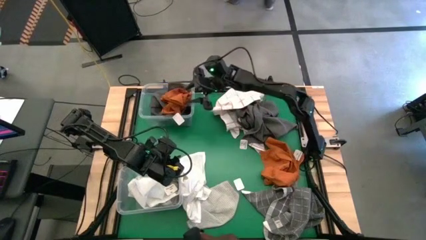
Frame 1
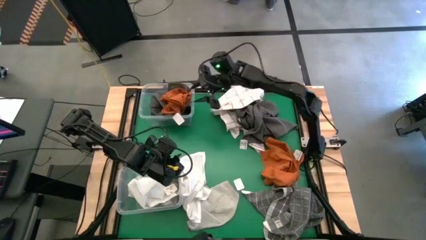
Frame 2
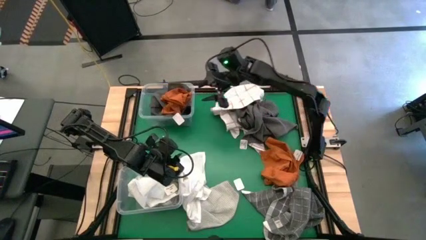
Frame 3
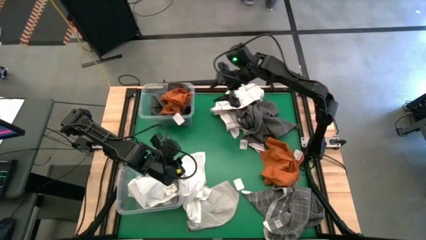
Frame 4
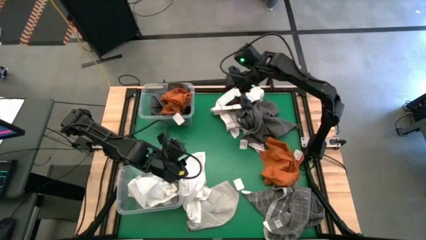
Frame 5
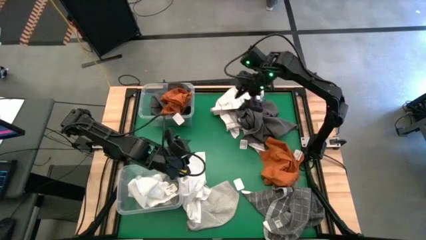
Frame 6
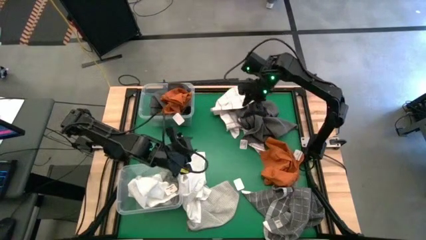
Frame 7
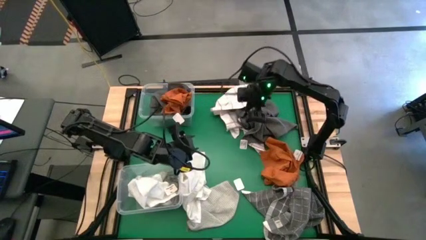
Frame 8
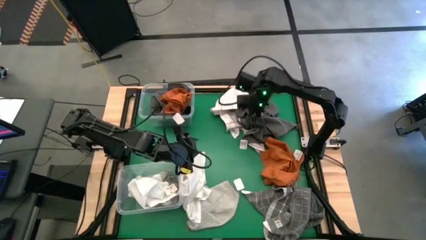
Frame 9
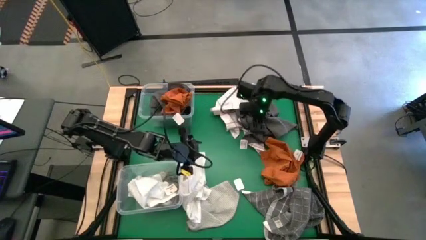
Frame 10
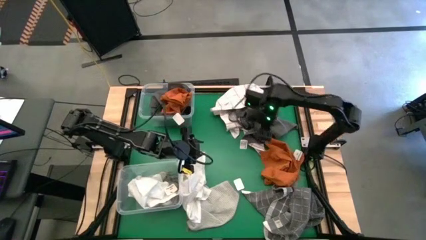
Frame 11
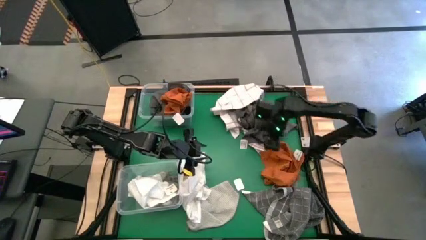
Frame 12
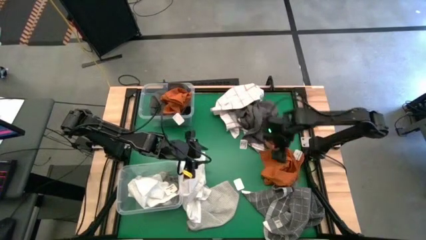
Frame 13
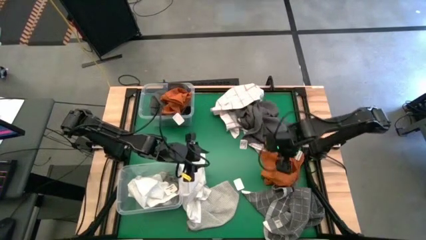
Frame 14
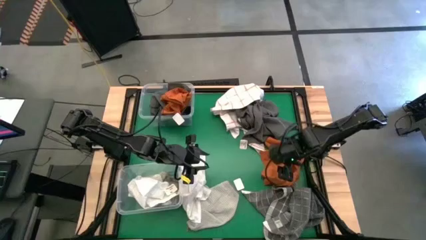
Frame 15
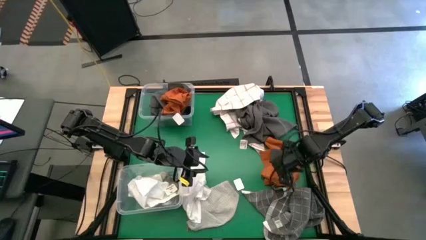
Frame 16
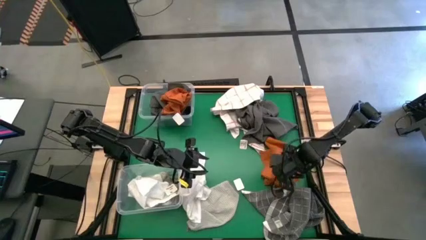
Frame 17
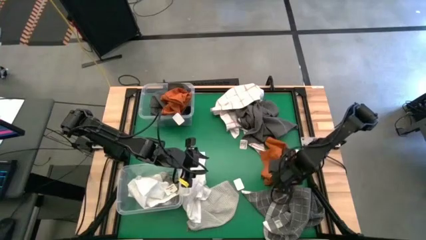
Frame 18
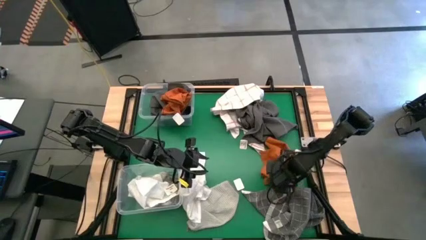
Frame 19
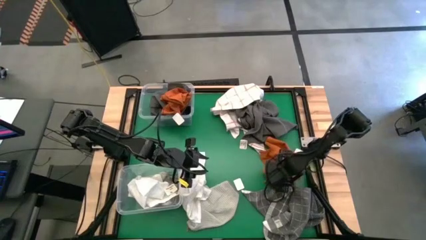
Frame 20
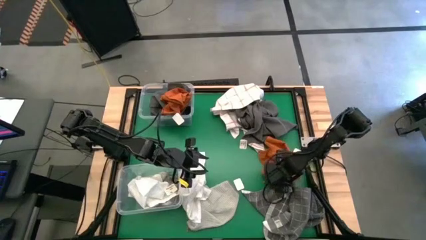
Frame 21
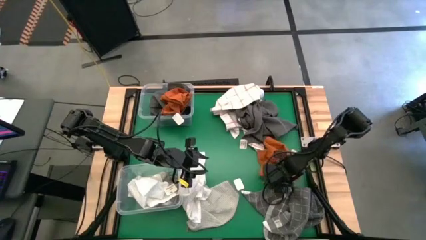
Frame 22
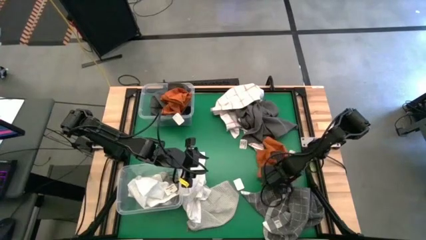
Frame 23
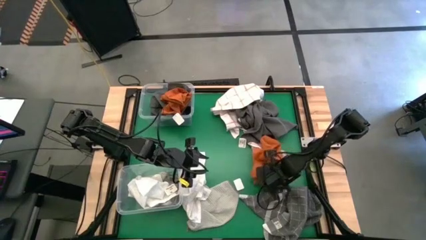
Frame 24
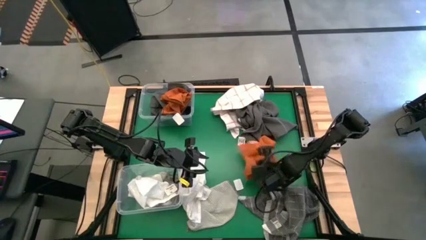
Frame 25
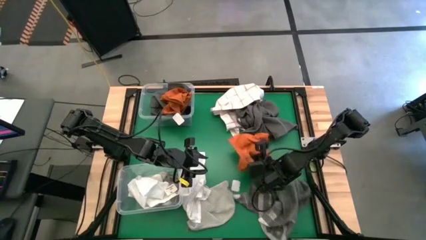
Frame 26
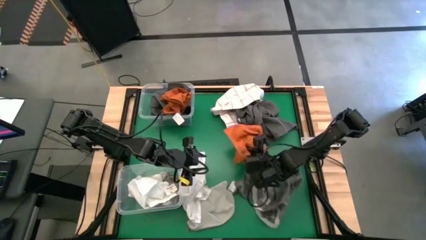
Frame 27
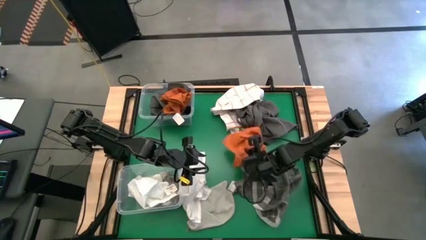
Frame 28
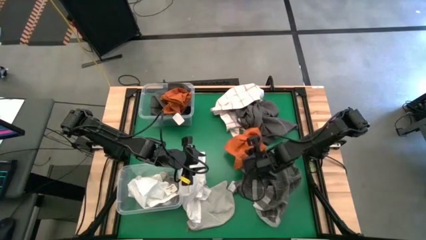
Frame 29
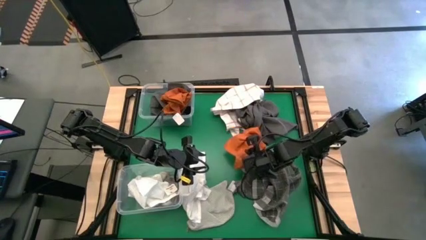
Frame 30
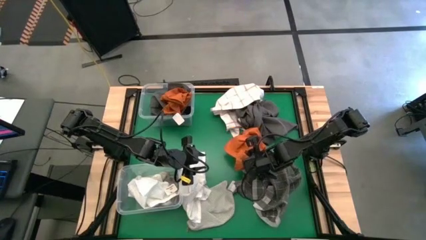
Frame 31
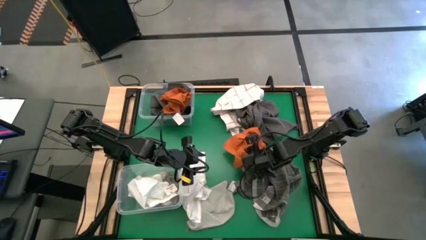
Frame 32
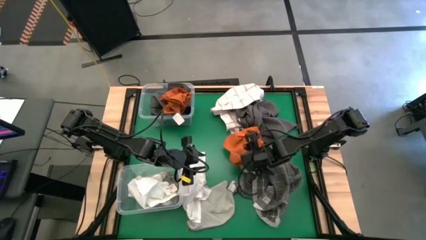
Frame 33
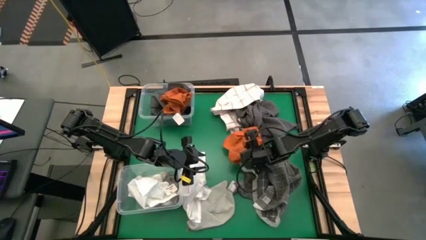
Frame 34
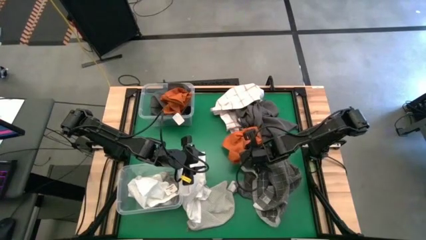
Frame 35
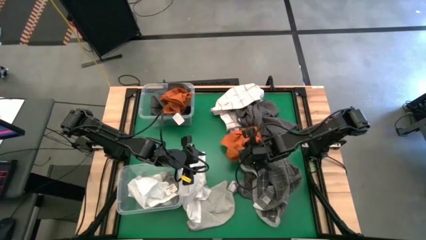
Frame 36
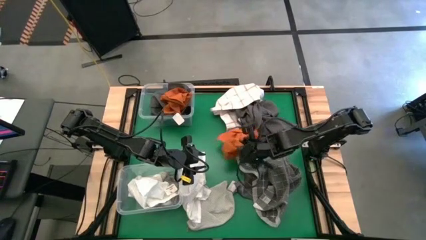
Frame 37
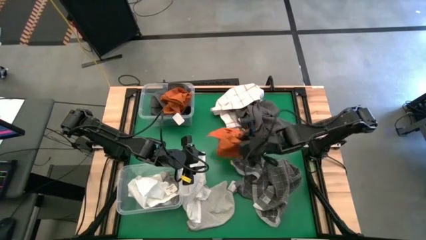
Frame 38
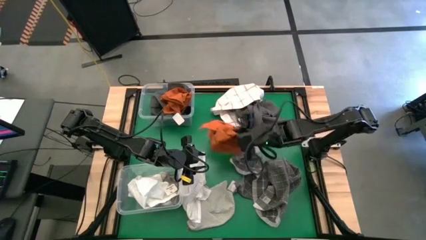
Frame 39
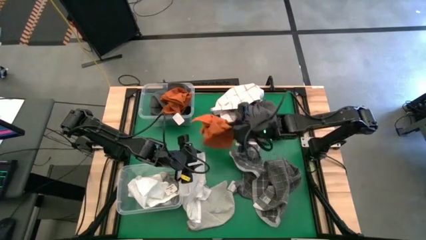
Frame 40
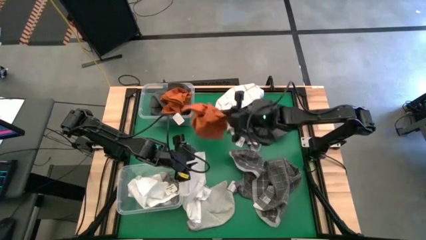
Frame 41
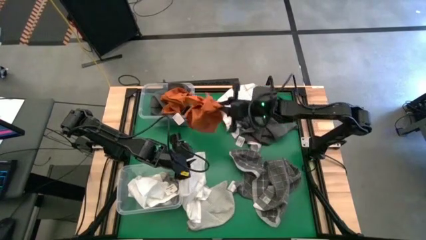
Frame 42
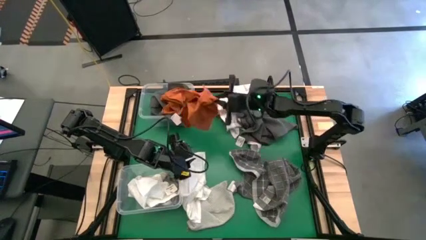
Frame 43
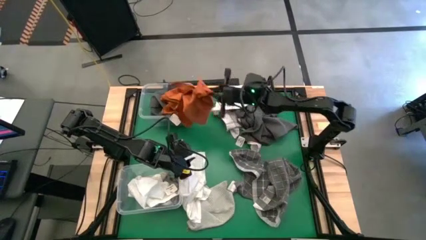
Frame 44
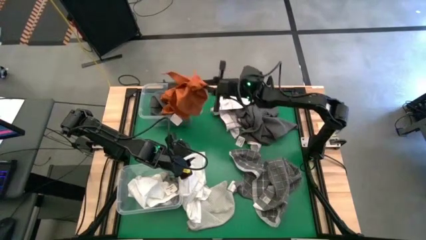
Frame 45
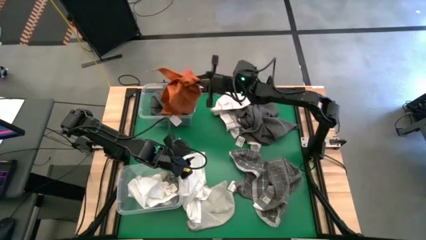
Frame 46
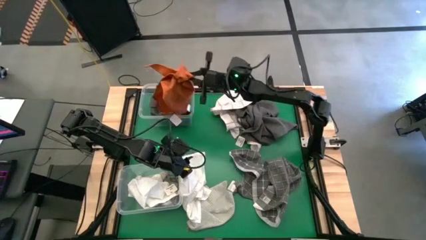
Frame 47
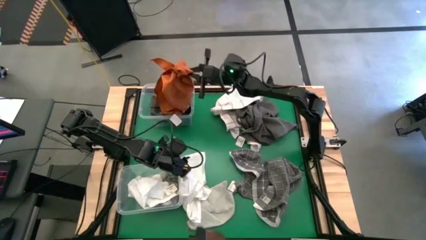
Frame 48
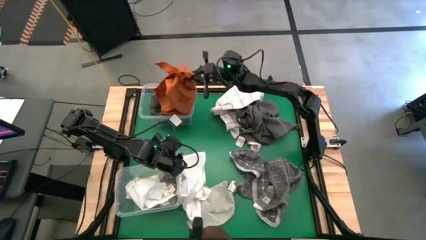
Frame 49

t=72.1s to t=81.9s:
Task: Sort towels by color in basket
Put the brown towel into the top transparent bin

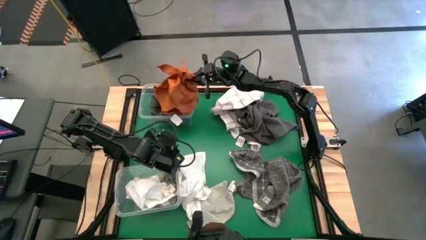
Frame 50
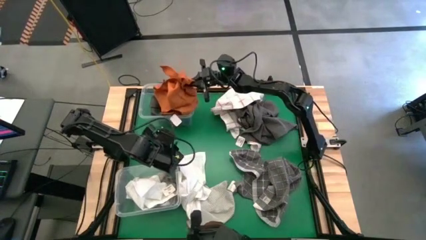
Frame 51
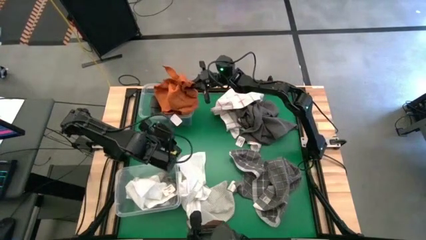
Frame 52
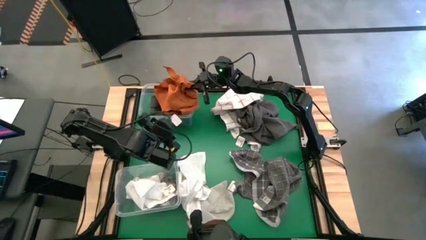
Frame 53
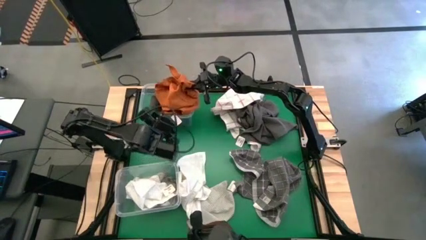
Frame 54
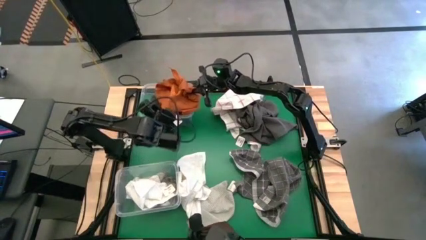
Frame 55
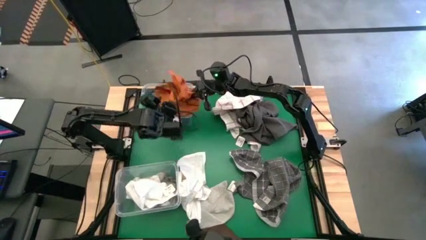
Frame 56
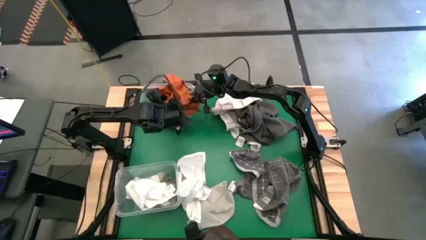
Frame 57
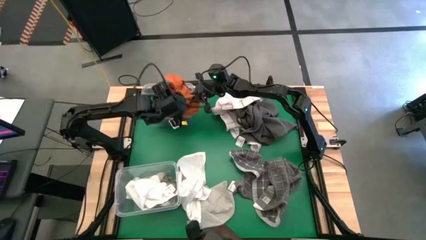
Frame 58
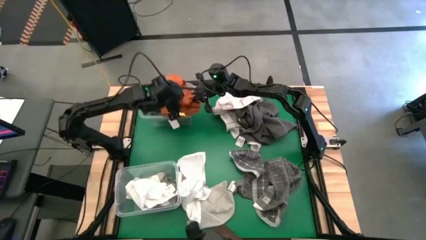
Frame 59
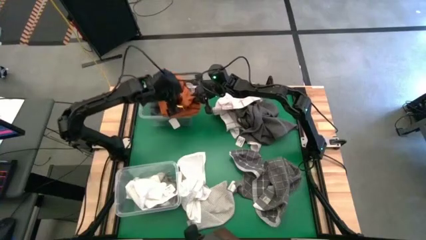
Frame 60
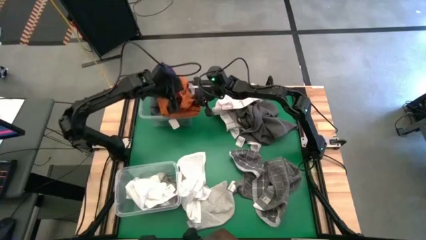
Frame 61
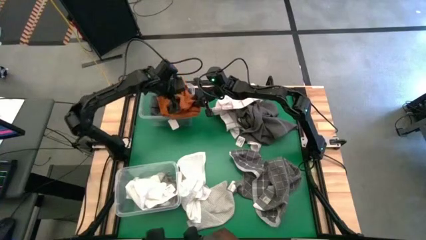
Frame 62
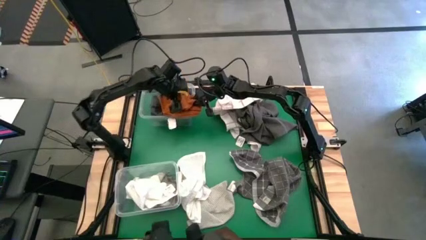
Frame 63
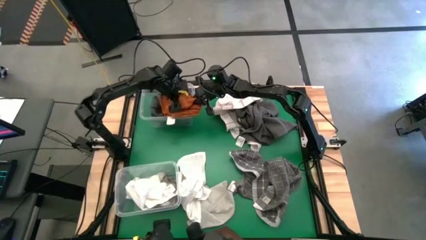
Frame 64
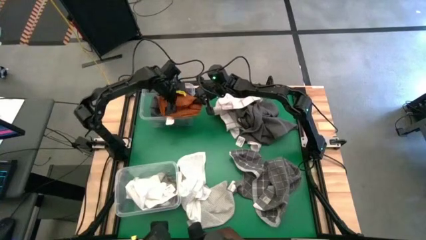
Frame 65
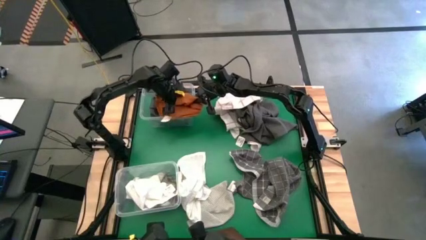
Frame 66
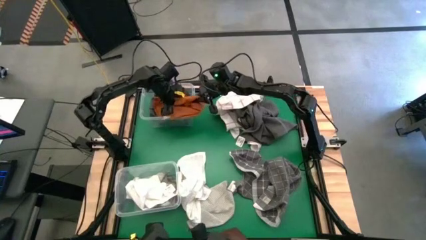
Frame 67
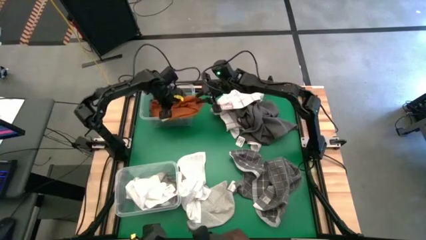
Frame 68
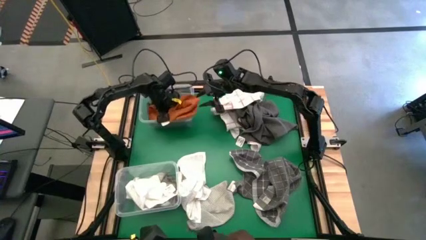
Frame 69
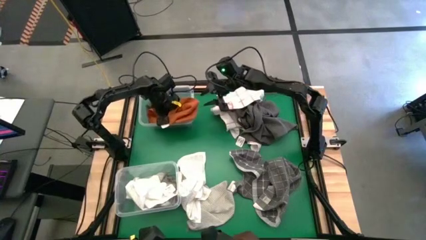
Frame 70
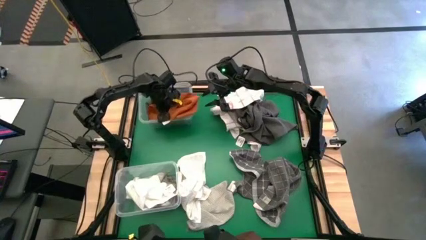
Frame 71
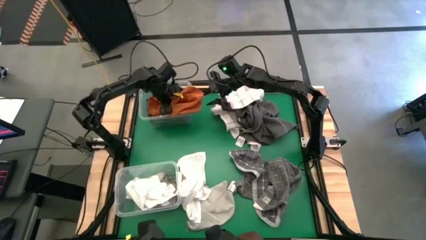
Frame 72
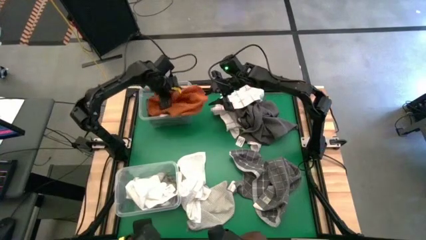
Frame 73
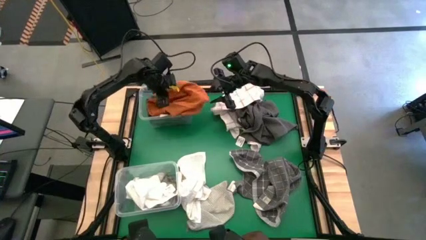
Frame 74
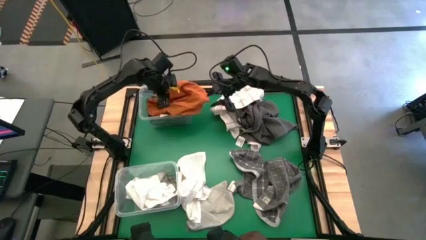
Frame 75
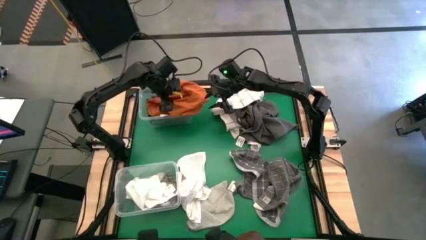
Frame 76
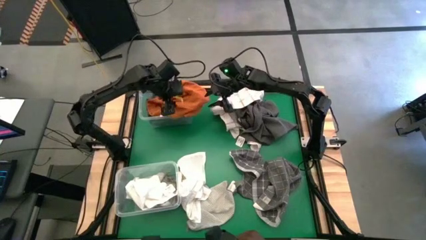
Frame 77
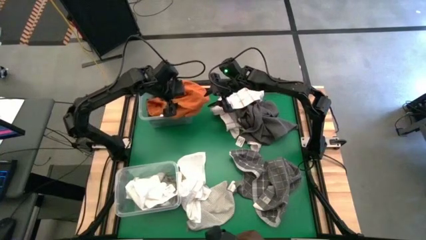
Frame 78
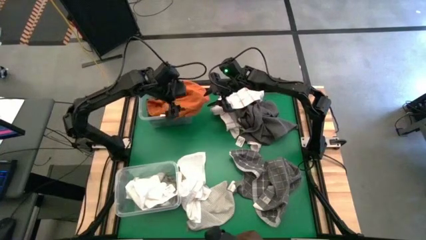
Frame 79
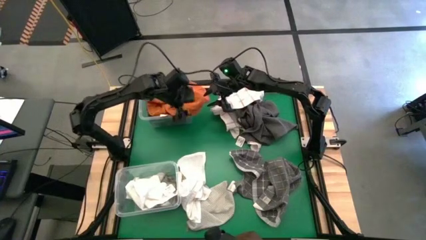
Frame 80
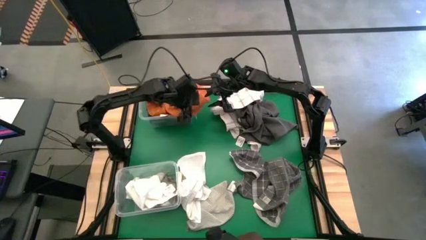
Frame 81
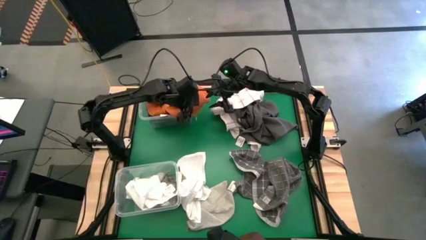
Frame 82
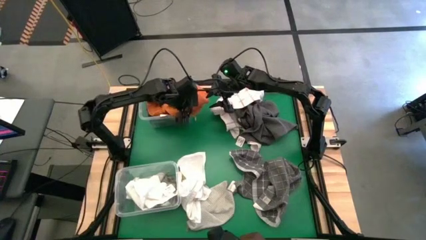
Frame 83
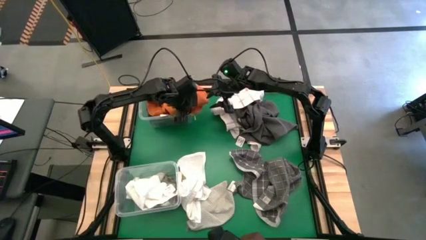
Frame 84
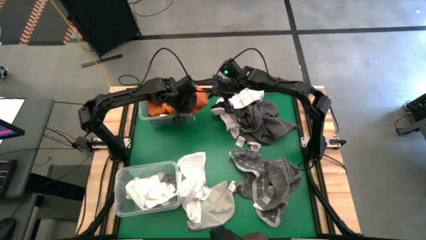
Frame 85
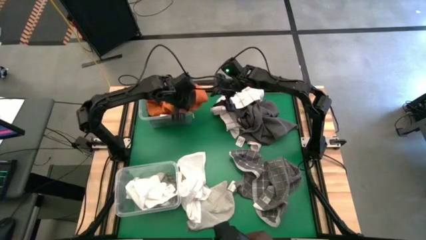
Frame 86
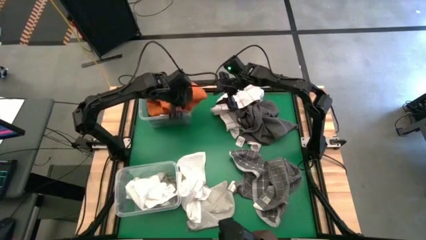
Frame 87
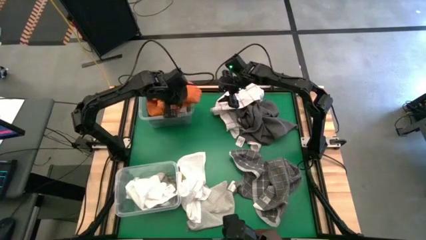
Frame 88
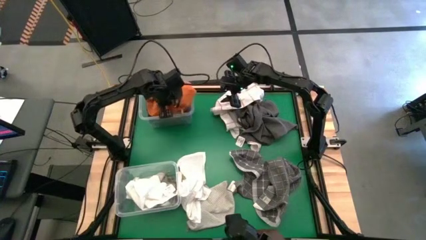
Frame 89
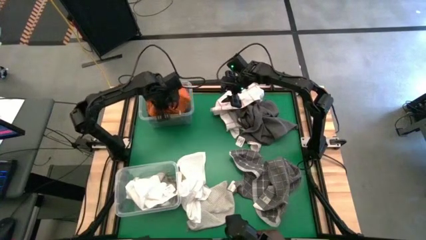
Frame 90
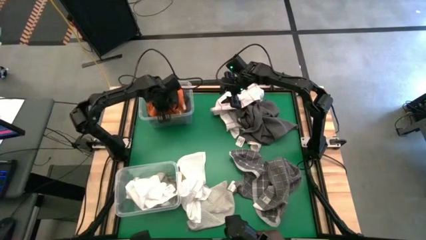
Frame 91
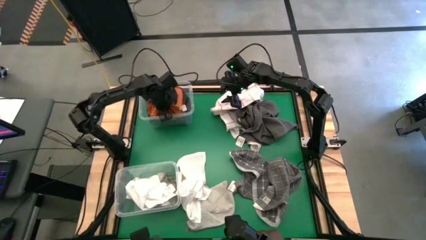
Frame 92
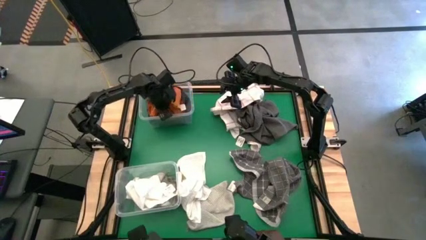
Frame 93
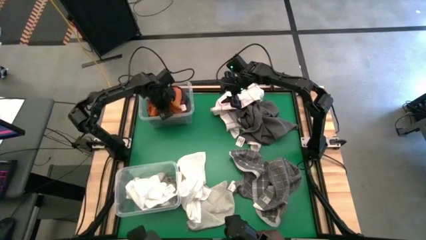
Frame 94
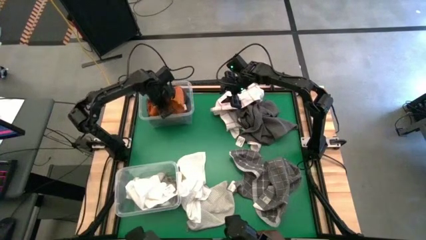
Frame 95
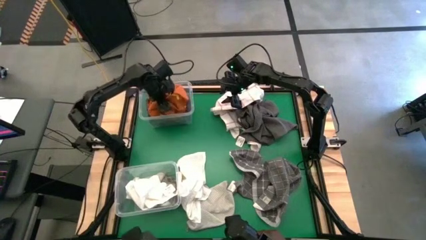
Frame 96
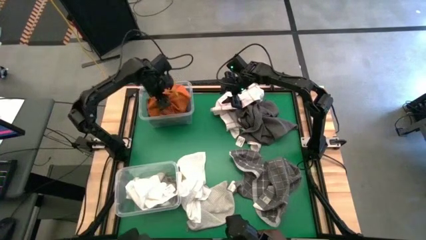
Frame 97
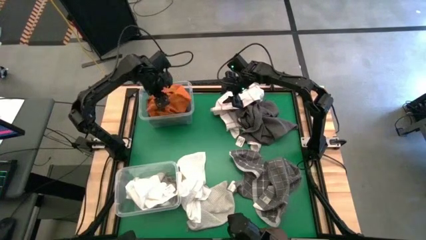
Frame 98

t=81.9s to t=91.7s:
Put the brown towel into the top transparent bin
